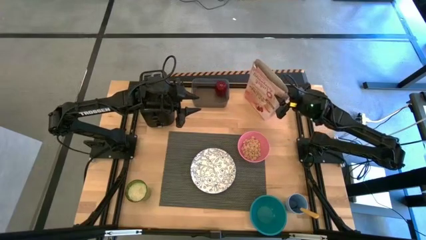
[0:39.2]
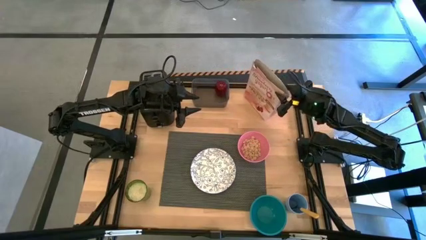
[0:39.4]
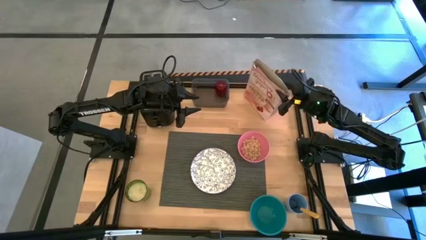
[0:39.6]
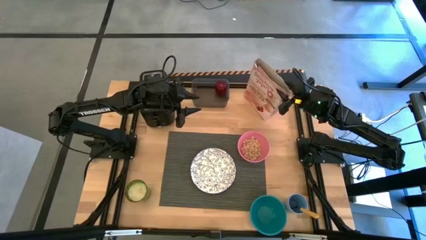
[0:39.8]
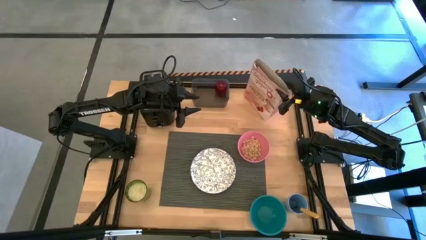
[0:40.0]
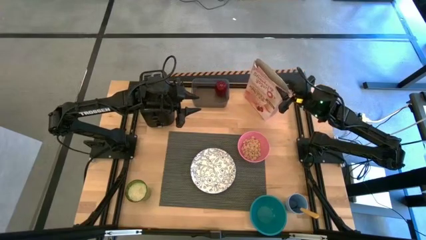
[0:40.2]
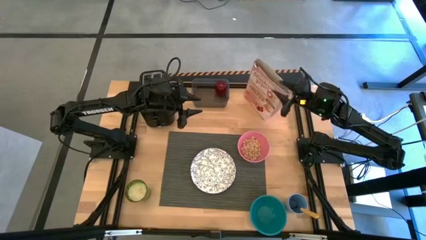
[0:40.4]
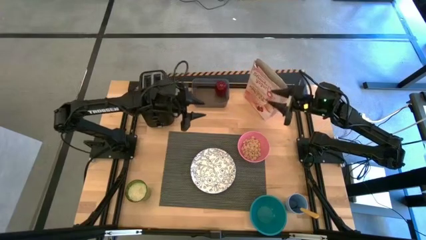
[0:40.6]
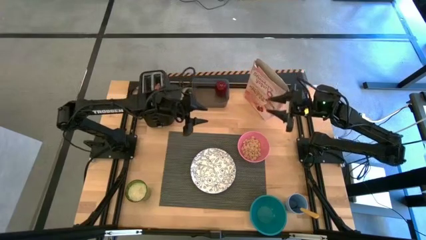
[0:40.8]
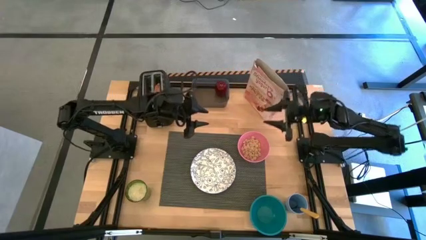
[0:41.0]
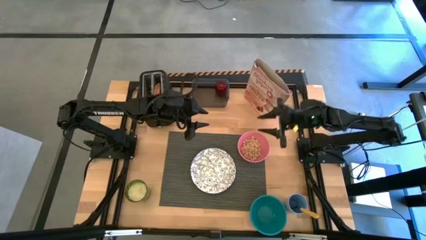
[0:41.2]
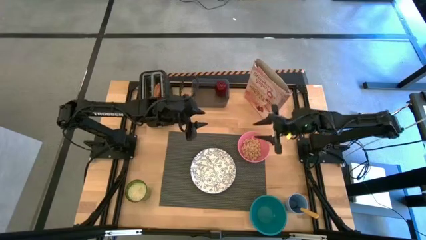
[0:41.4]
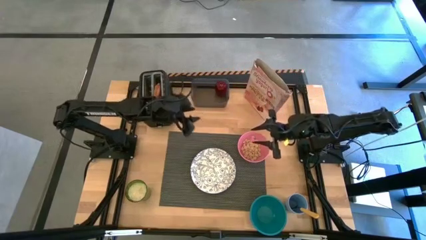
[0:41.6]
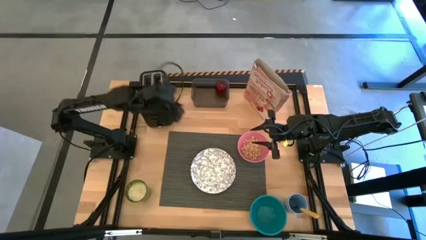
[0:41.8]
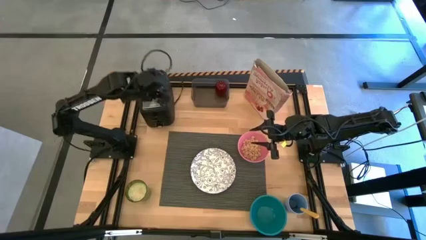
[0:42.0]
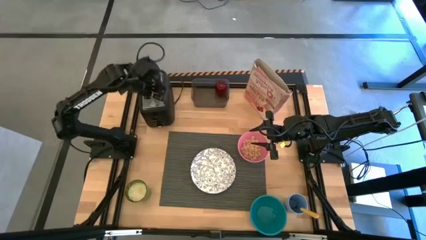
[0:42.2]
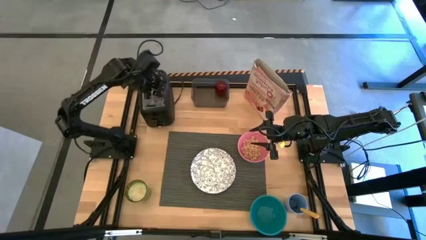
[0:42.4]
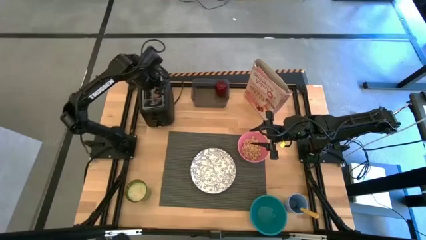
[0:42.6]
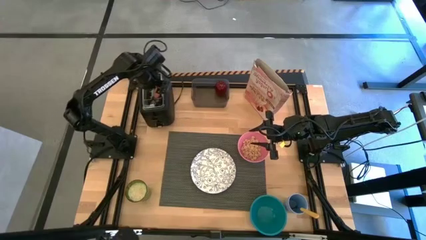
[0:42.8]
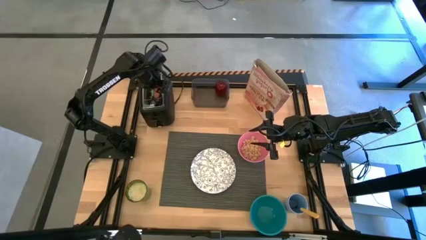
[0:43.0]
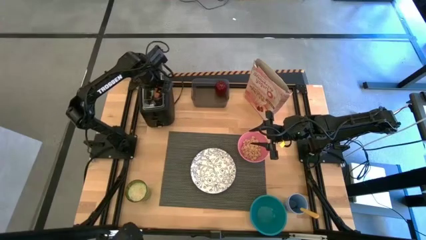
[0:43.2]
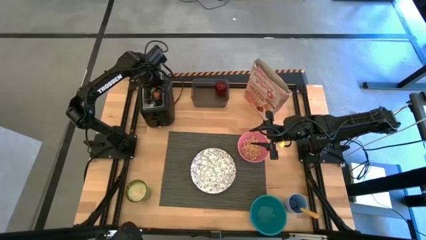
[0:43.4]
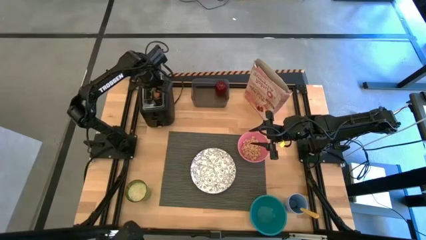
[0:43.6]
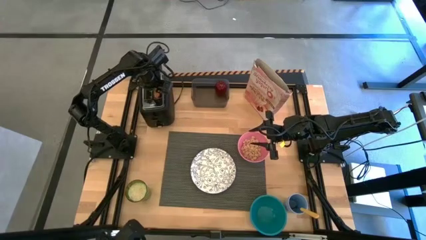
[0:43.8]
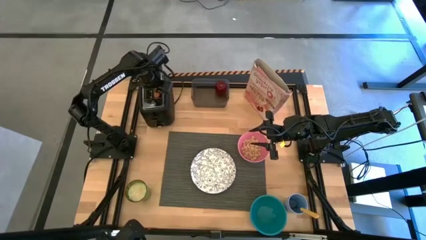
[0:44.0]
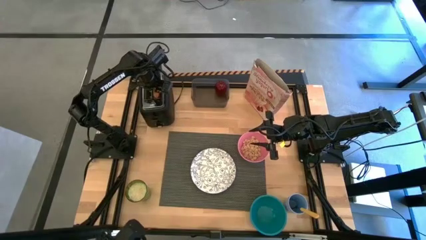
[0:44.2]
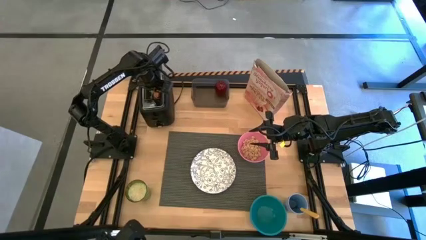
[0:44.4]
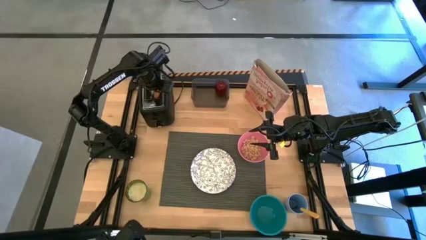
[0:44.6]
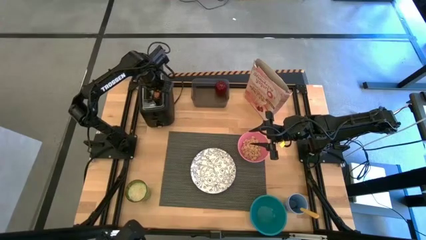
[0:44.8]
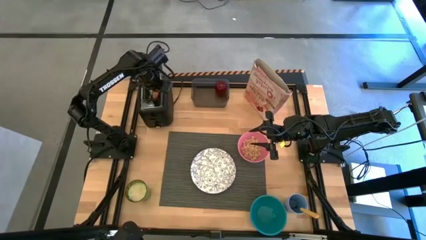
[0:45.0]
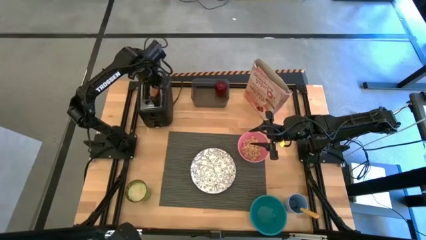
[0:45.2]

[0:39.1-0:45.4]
Task: Arrange a breakfast setting
Put the bagel on the white plate

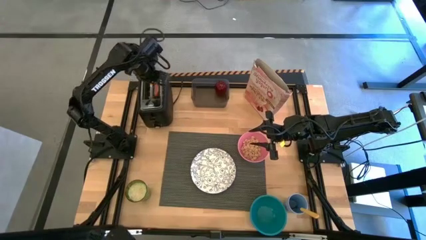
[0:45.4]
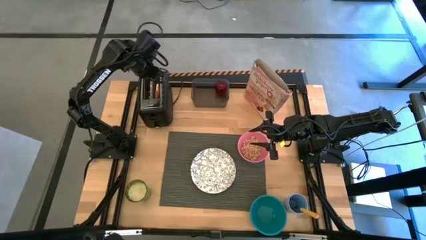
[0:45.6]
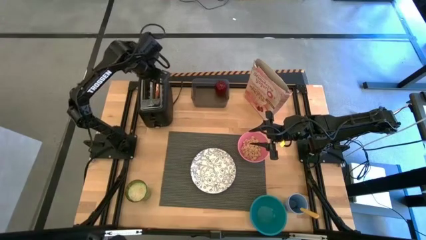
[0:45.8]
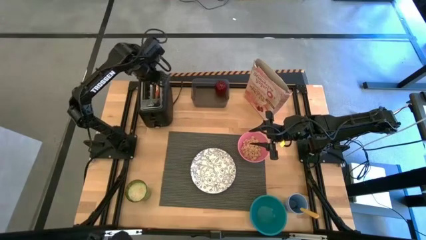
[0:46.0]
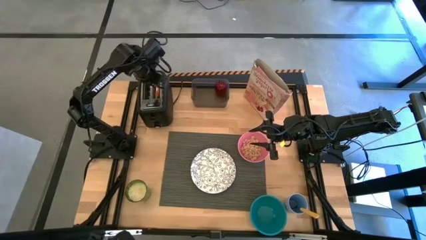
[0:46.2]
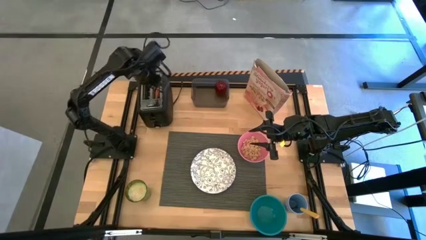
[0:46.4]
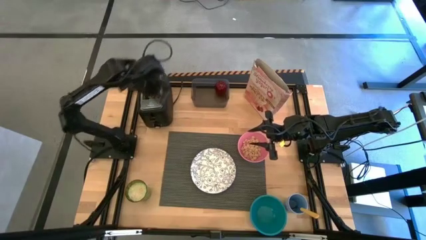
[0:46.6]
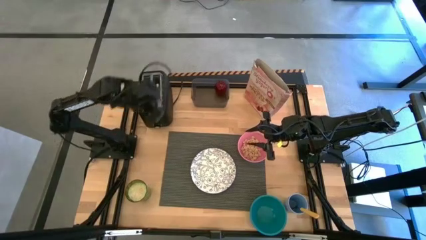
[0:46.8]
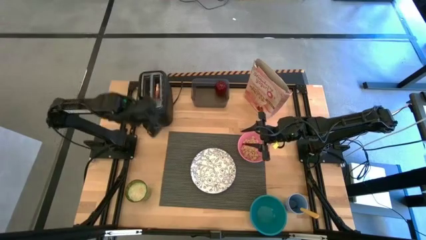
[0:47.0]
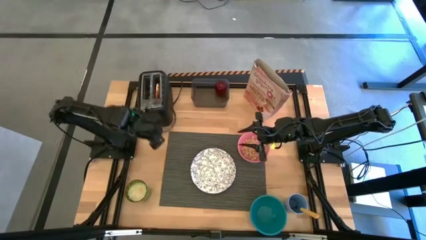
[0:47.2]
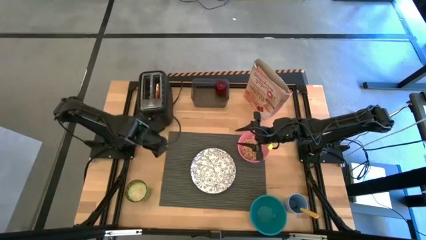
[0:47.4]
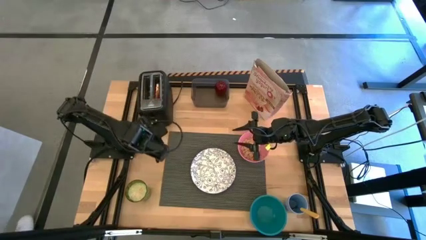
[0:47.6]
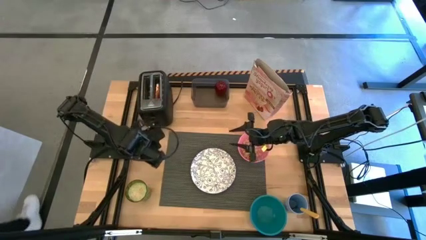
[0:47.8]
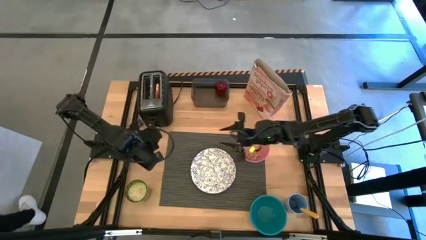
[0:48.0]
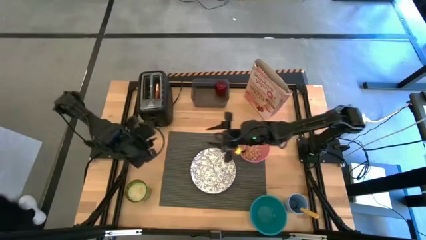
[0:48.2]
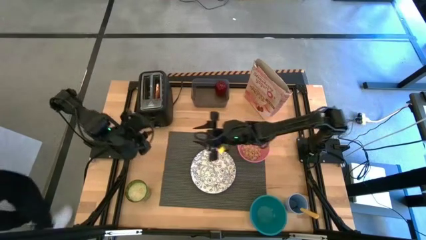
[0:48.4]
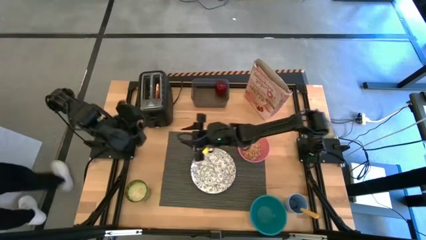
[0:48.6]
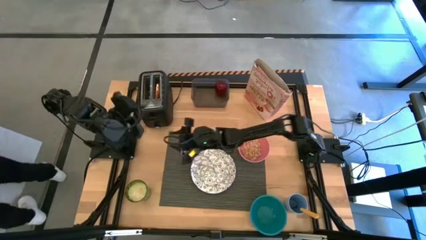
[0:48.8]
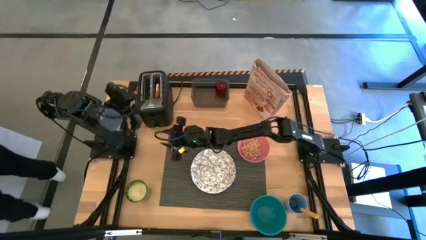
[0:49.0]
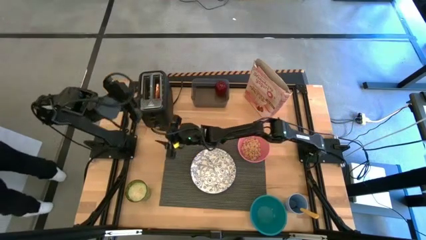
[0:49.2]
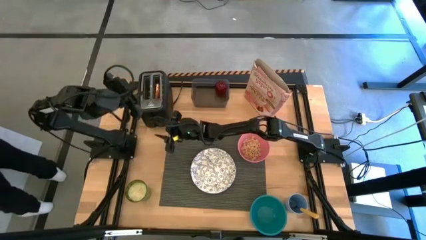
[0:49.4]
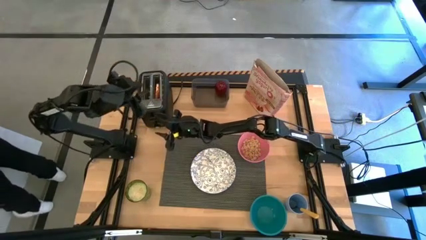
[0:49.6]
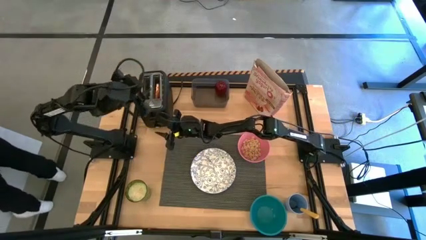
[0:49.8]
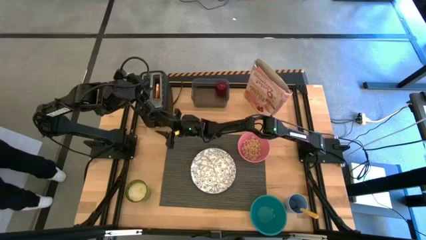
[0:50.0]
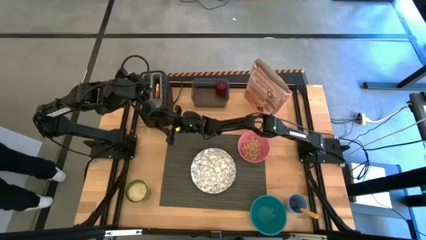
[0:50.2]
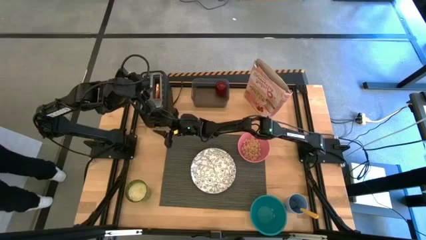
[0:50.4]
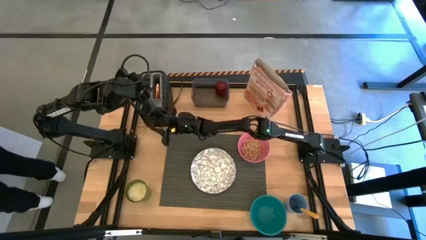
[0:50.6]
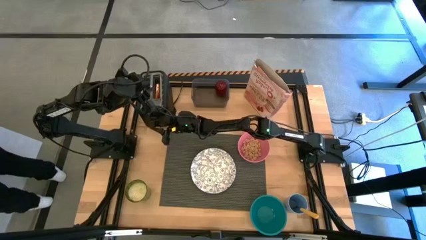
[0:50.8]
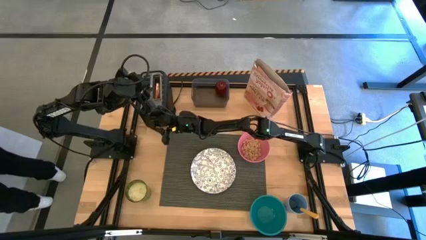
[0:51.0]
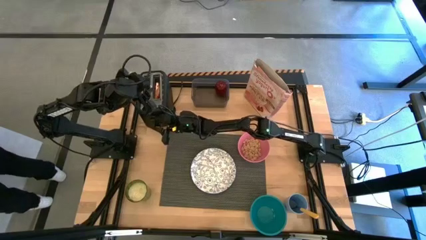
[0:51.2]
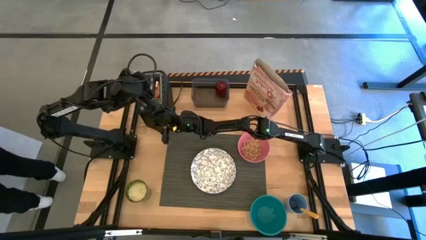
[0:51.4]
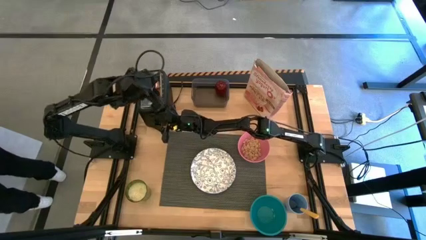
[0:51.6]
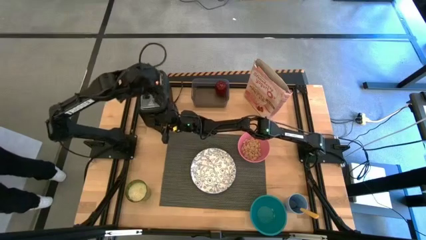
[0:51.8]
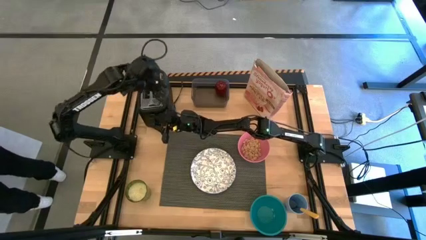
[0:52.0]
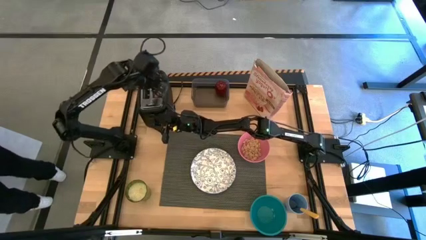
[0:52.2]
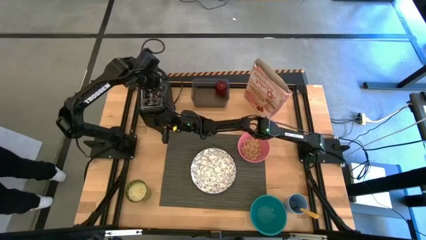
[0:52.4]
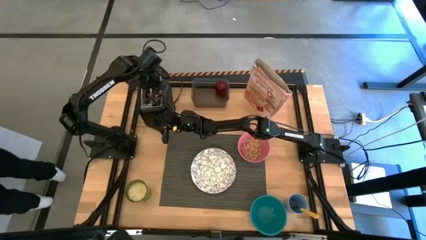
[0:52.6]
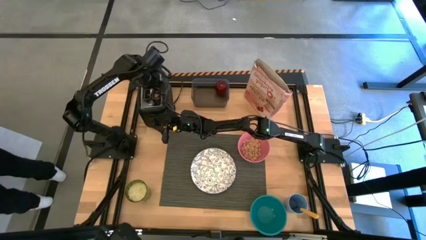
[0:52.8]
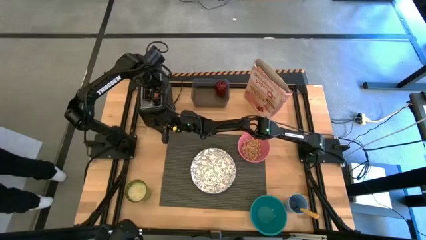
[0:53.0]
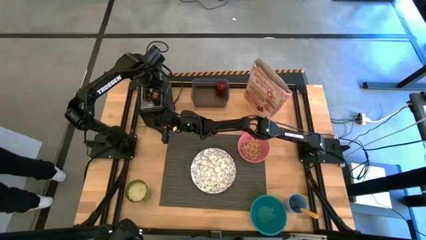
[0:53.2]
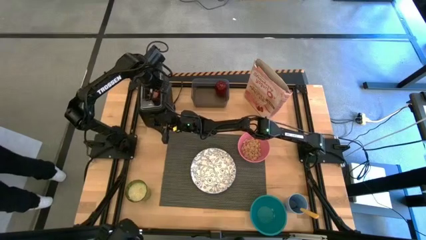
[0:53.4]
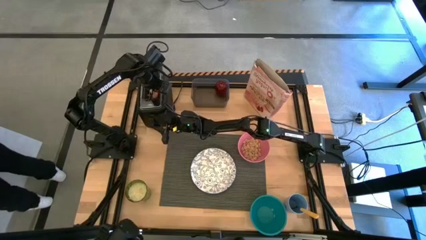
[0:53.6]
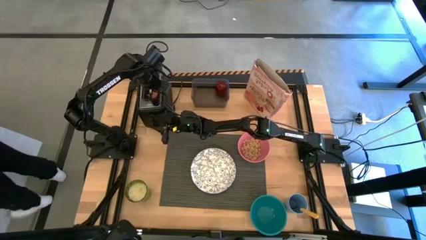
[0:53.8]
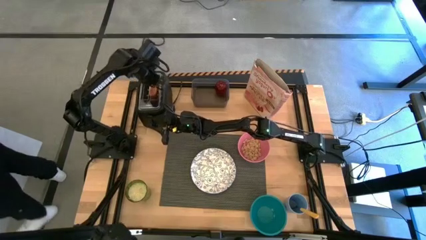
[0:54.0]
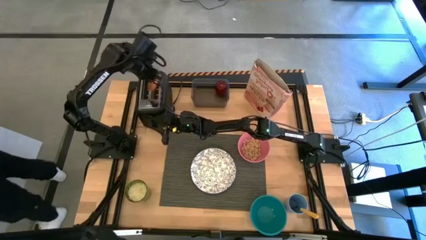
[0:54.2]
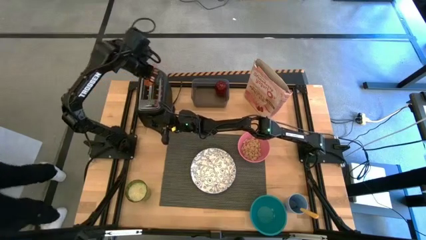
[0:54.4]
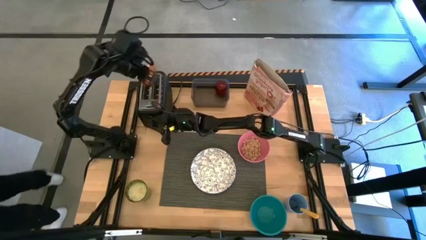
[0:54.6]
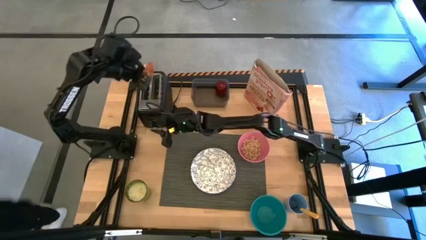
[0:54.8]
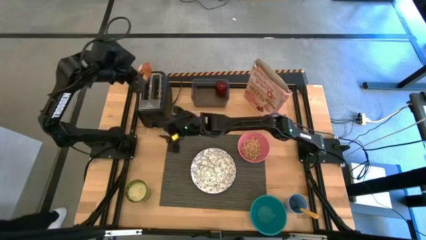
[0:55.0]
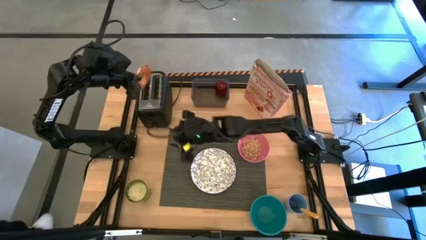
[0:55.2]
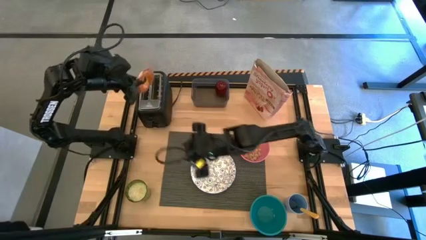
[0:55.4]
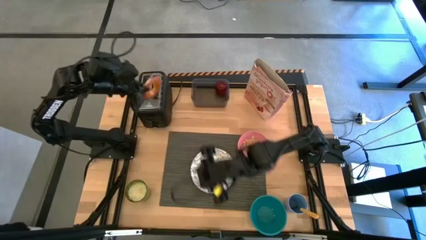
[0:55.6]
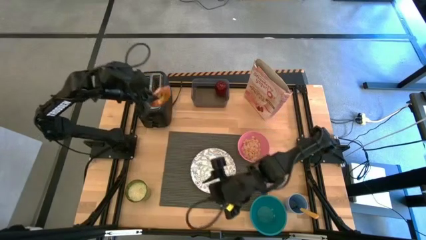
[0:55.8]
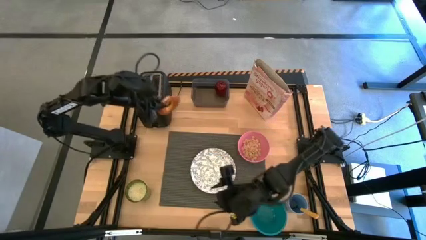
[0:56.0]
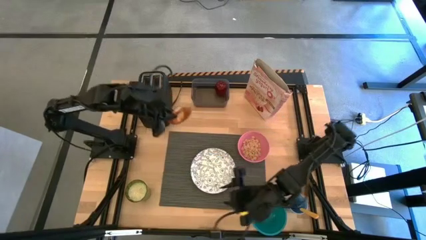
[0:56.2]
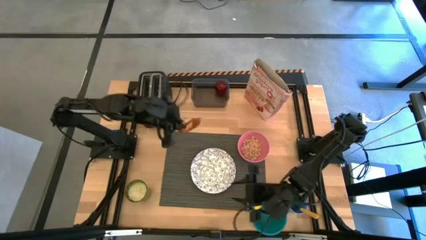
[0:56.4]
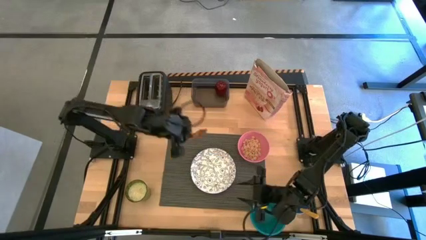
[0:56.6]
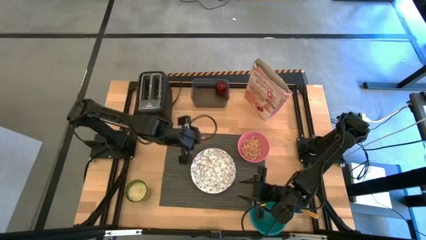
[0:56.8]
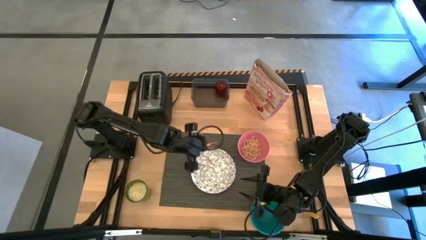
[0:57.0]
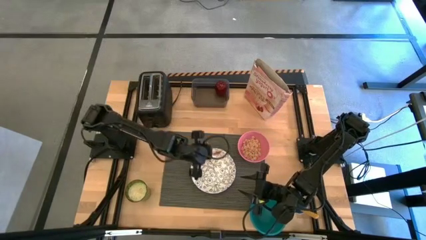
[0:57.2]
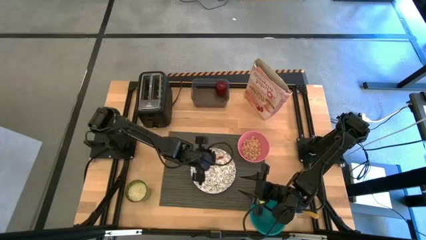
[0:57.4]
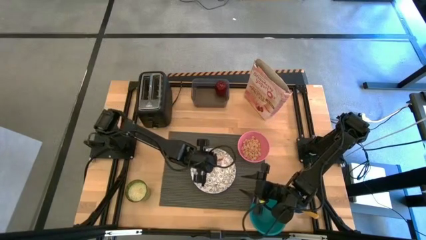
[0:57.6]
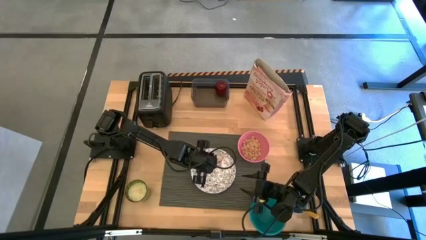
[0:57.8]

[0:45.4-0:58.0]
Put the bagel on the white plate
